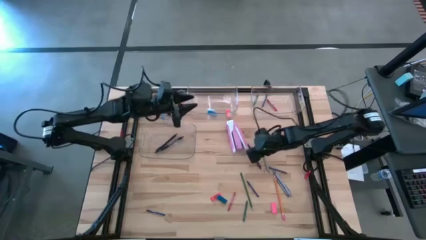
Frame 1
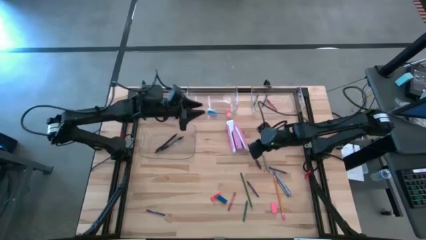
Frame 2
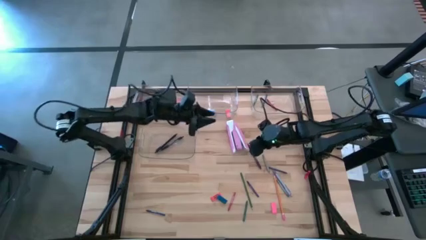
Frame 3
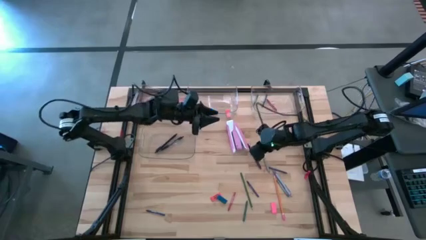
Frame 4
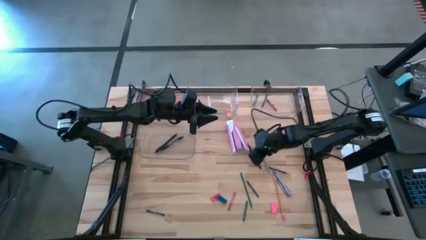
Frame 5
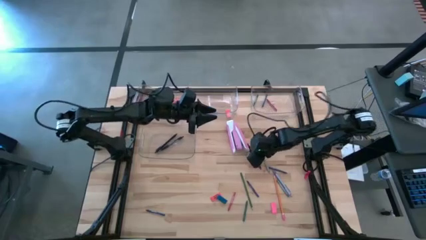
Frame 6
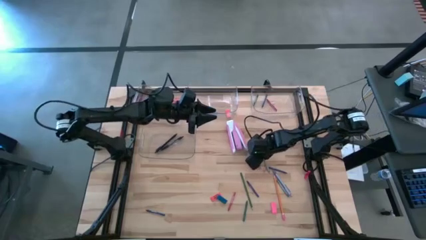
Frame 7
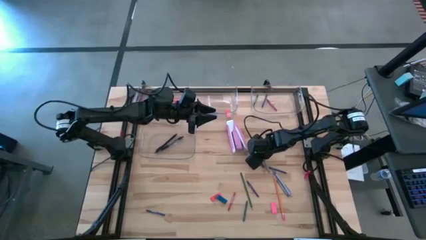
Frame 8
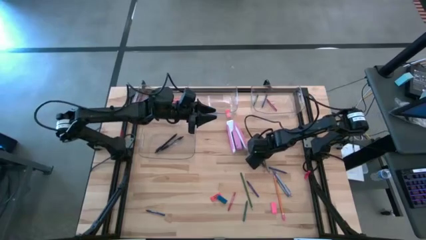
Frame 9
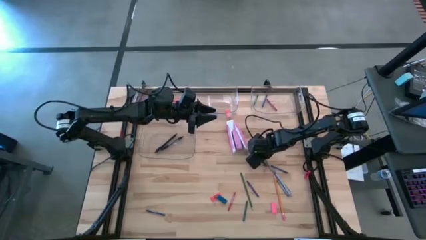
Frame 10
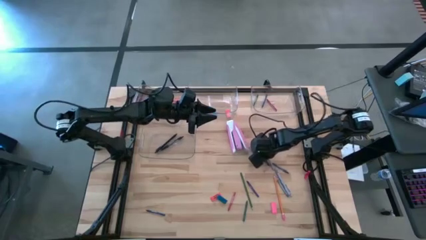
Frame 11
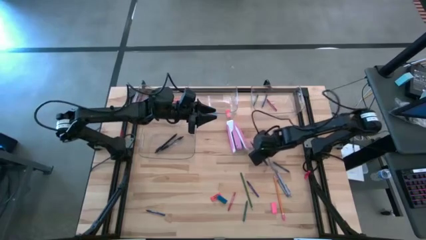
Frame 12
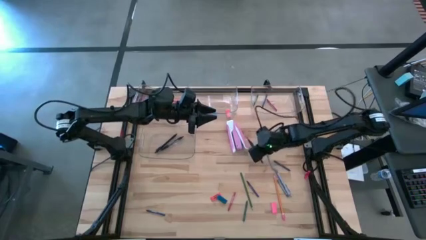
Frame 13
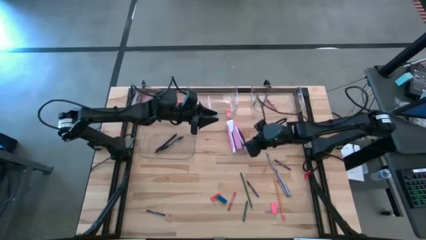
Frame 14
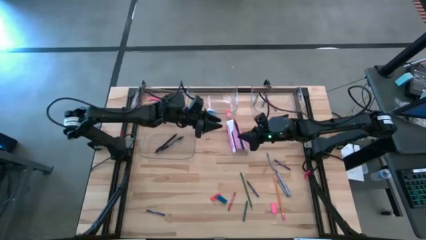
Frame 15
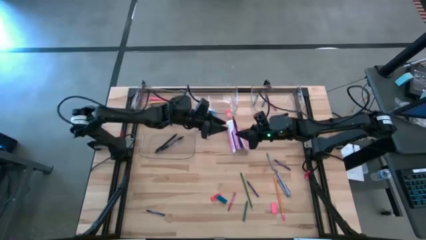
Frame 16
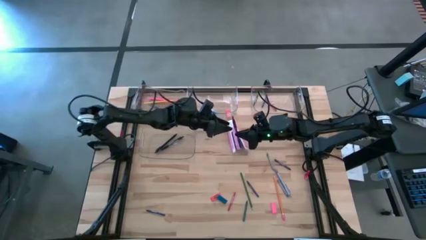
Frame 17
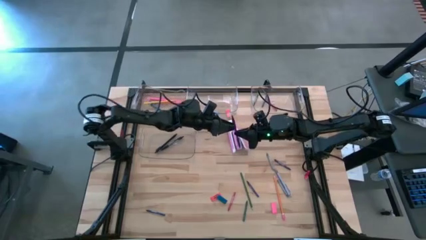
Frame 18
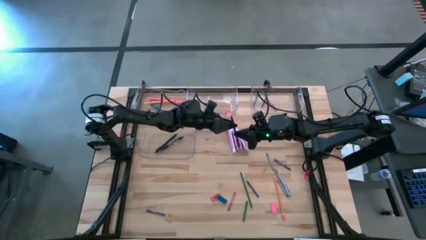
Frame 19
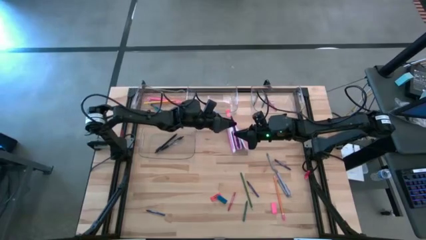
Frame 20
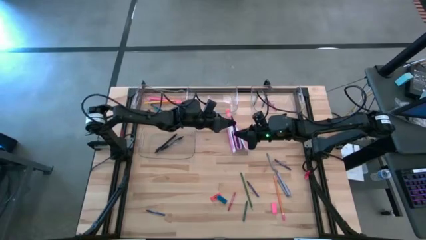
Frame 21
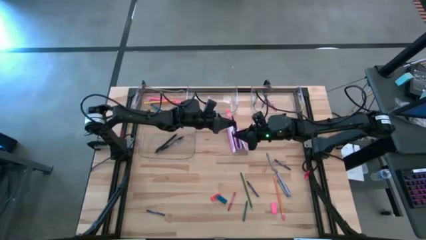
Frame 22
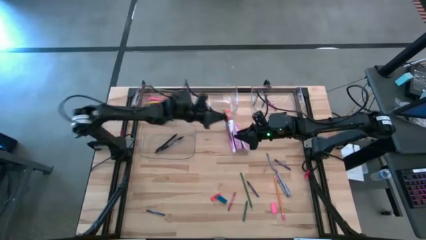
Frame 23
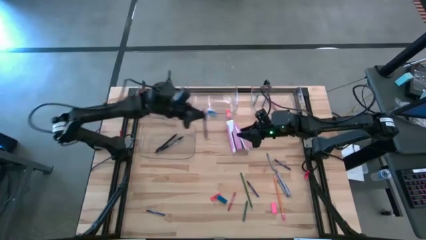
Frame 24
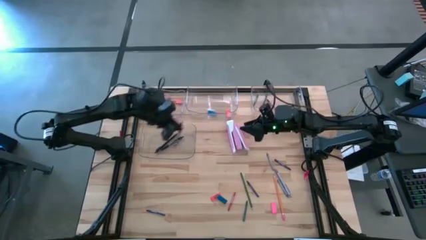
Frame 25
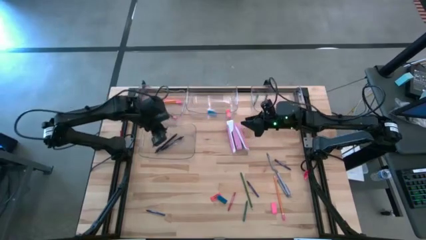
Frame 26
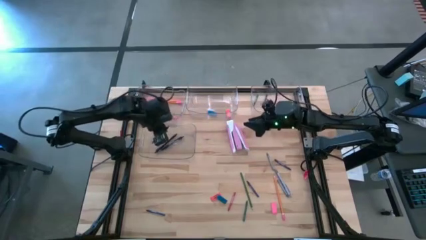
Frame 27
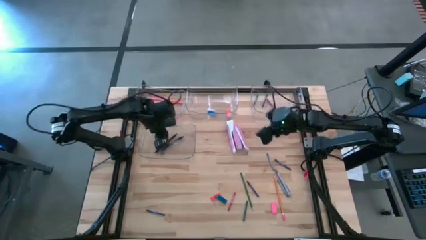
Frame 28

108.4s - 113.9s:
Task: Sort crayons/erasers/pens/pencils in bins
Put the purple pen into the bottom left transparent bin

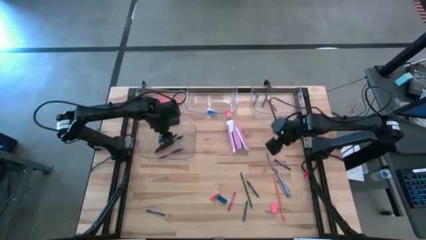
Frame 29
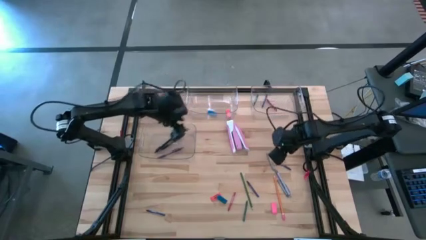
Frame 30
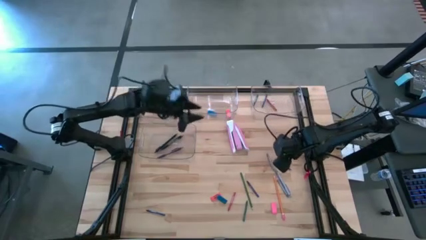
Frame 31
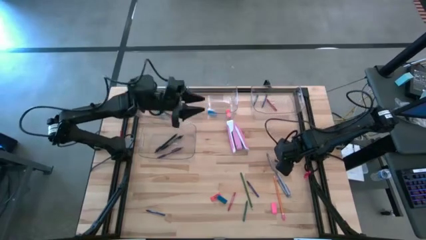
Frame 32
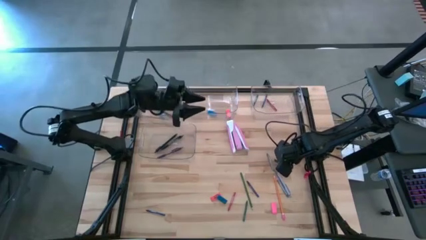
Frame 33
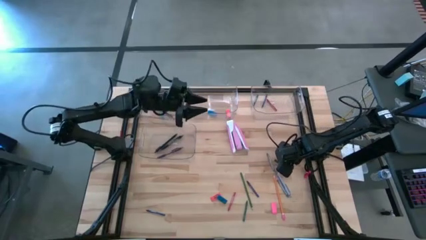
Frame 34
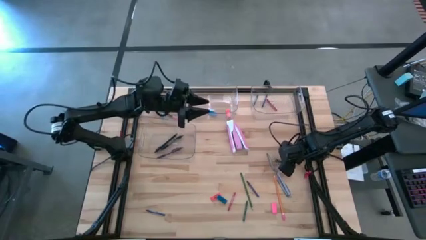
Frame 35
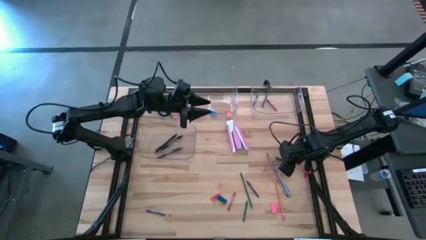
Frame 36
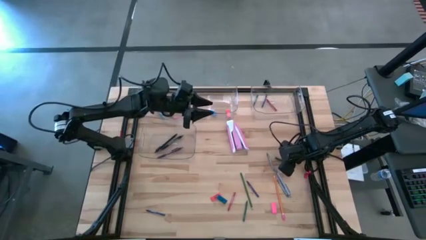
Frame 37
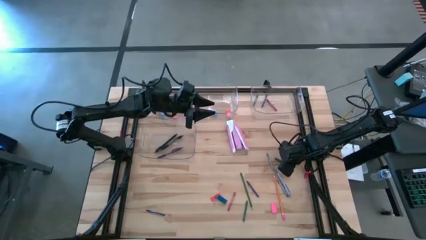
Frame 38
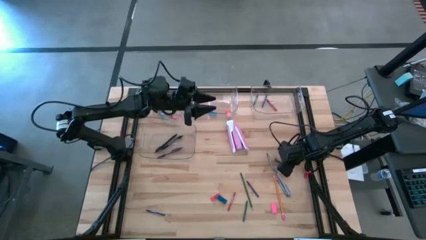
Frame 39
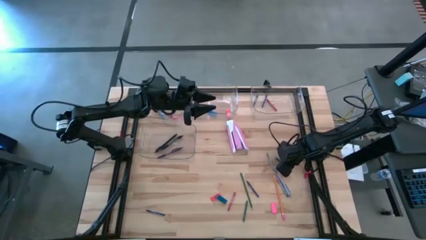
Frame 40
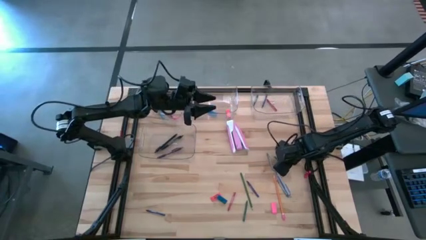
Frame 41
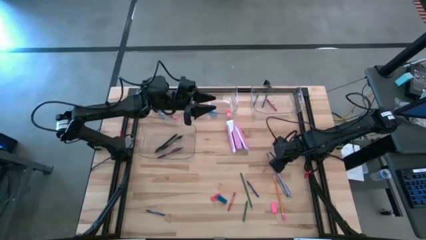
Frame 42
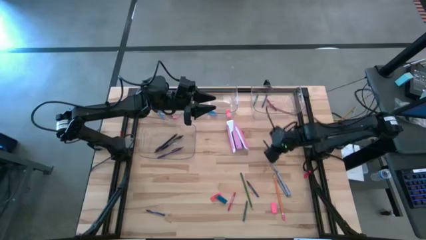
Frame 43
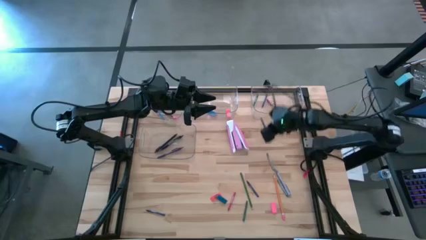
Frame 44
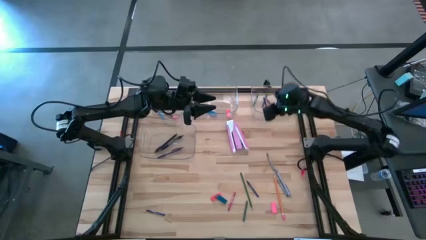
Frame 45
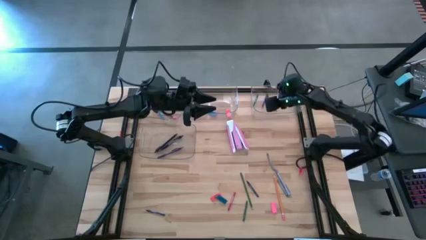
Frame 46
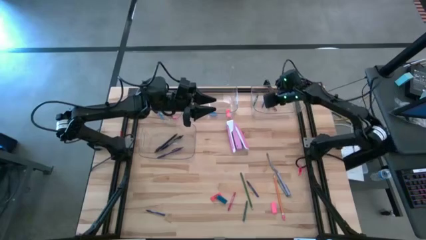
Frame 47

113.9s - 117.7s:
Put the blue crayon into the top right transparent bin

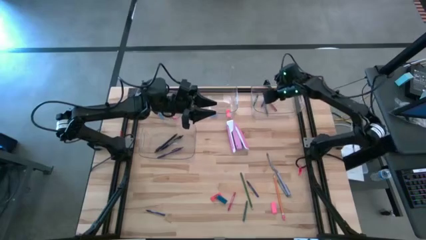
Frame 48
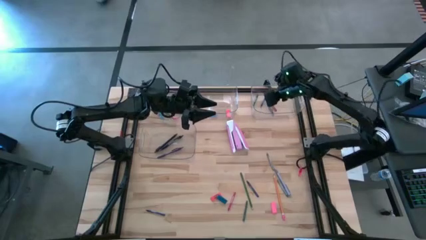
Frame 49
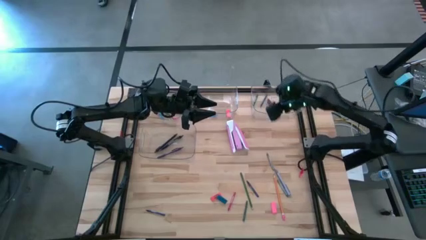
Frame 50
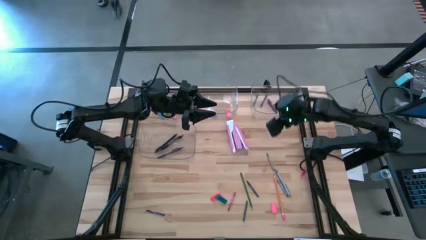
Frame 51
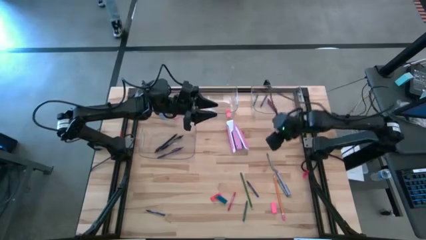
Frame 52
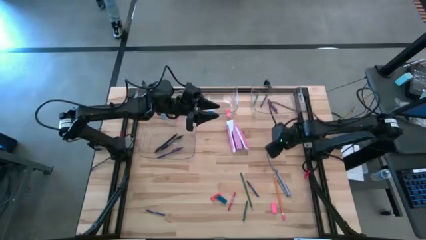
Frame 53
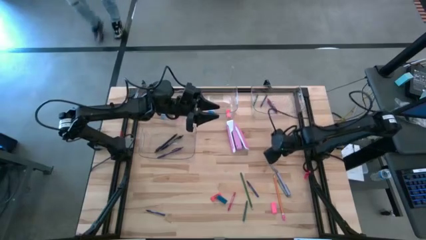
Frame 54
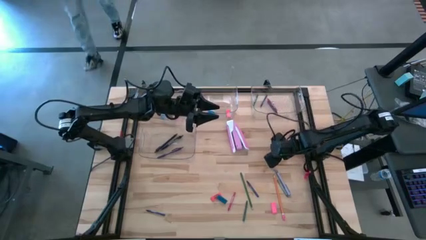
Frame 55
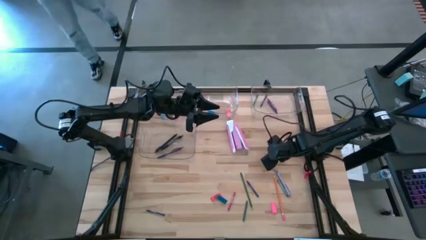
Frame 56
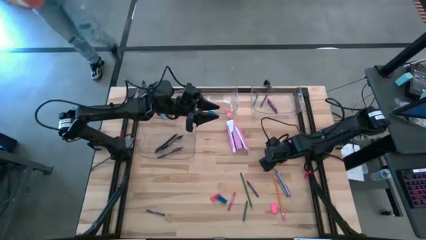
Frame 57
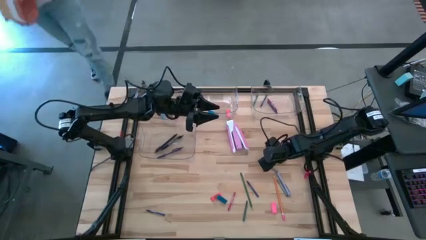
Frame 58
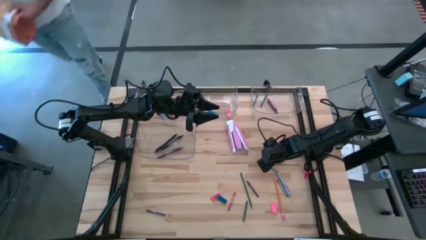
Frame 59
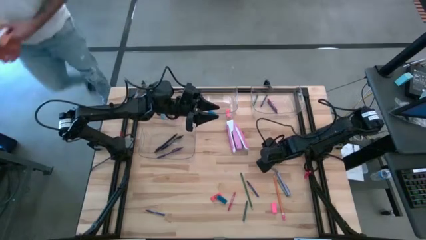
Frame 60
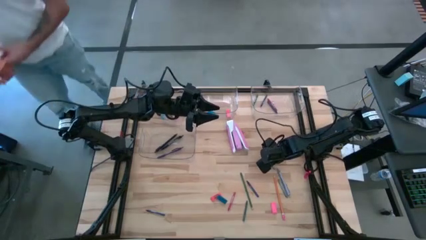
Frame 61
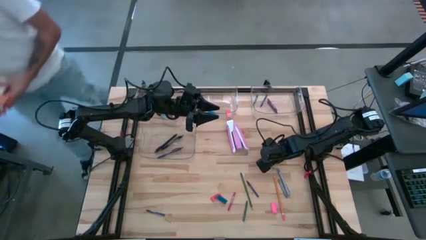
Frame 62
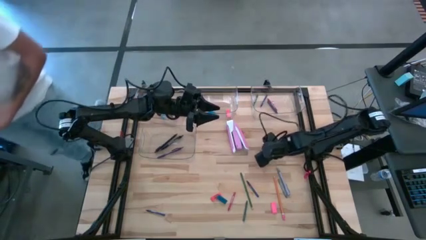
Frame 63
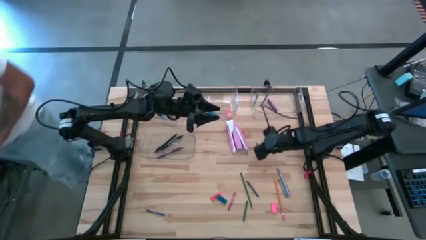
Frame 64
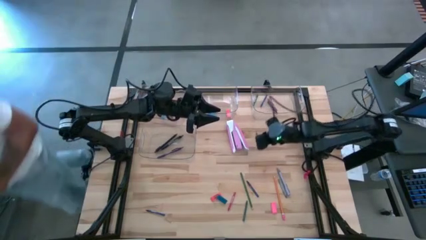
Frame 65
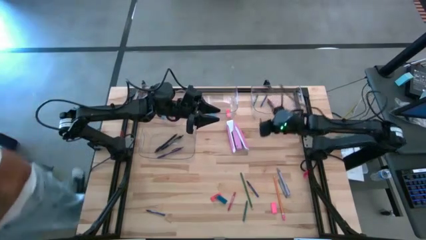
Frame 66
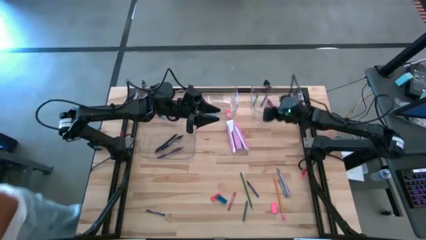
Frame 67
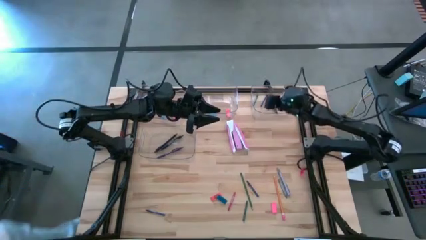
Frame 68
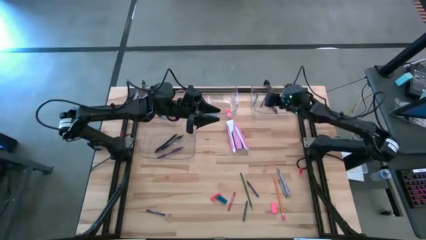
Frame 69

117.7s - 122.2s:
Put the gray crayon into the top right transparent bin

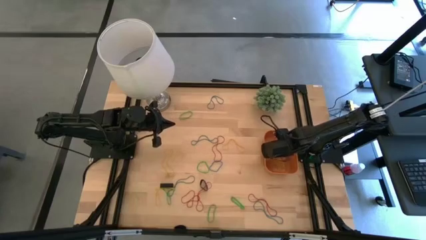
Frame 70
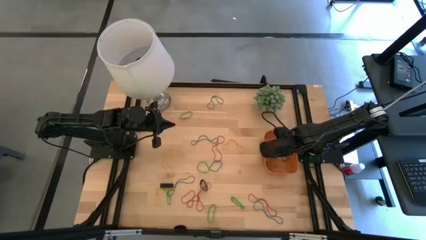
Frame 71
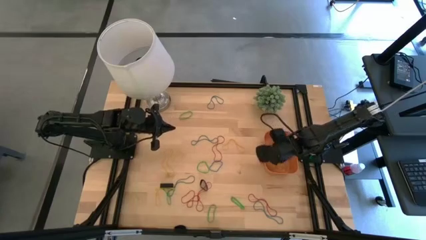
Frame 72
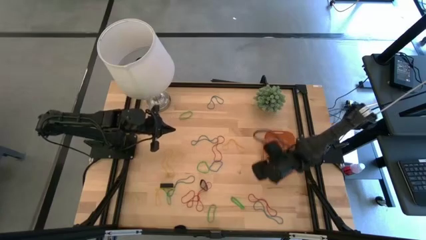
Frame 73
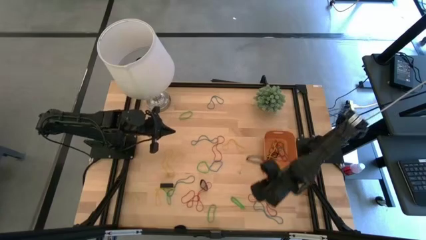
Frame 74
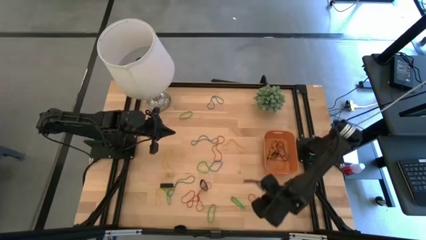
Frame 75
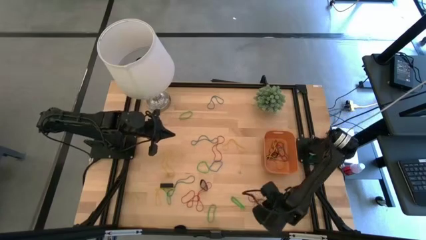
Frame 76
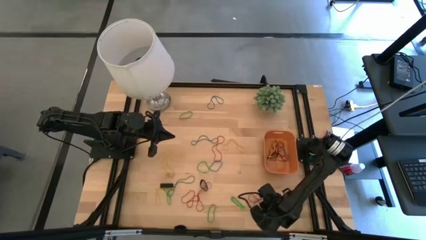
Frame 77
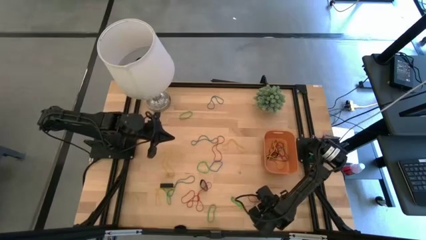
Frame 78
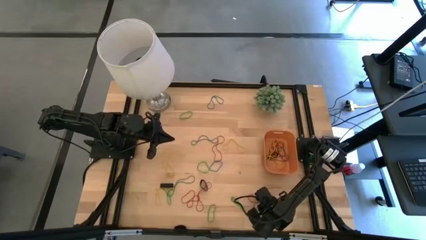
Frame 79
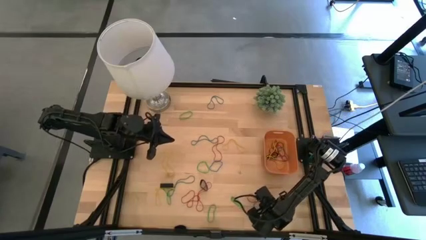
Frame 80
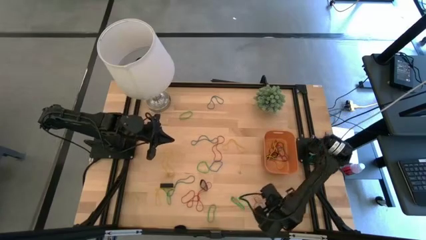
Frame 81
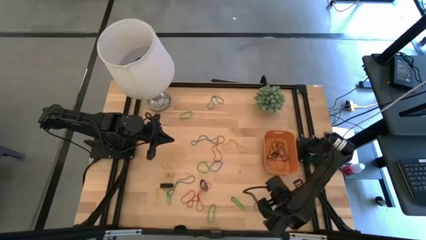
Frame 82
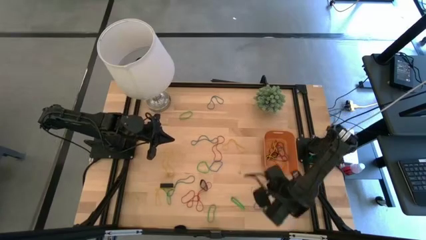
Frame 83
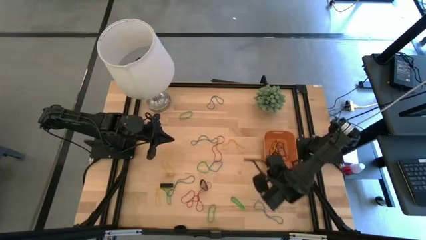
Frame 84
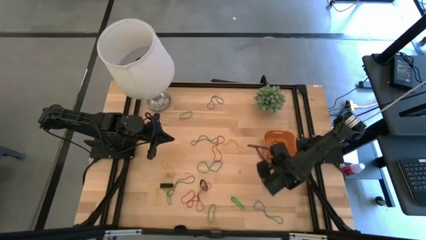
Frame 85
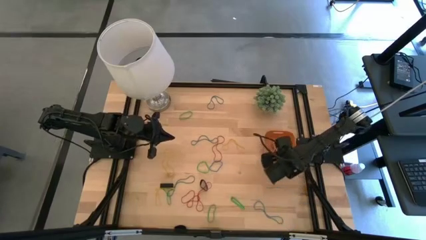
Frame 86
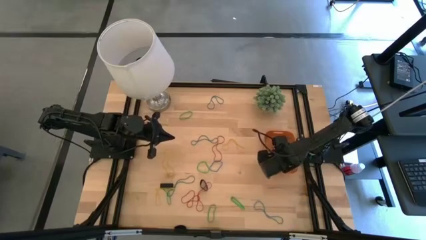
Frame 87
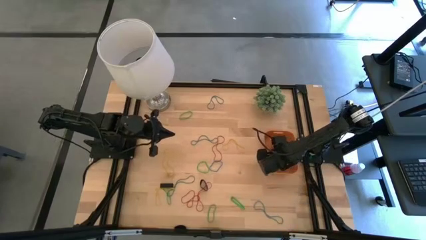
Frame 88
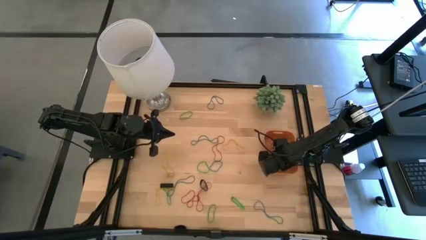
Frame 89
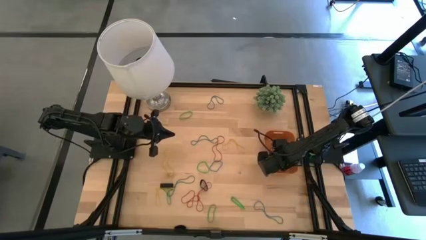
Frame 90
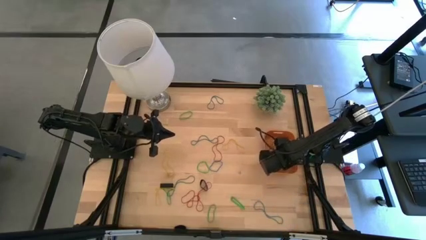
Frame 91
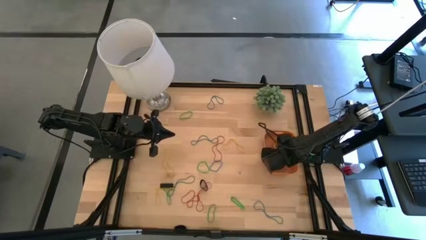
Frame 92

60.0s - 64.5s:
Task: Pick and place rubber bands into bin
Put the red rubber band into the orange bin
